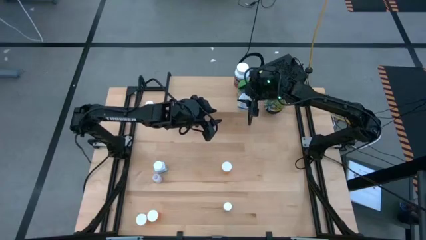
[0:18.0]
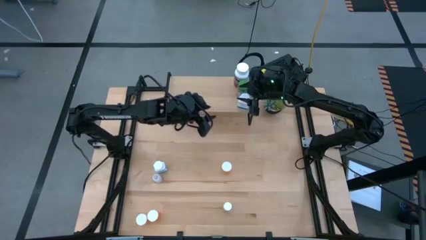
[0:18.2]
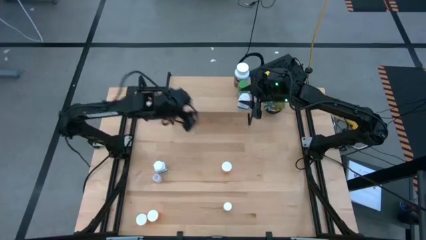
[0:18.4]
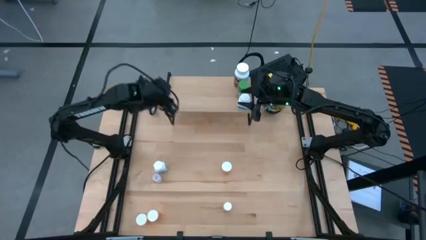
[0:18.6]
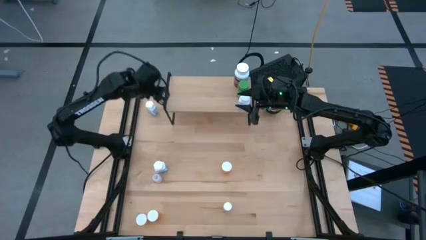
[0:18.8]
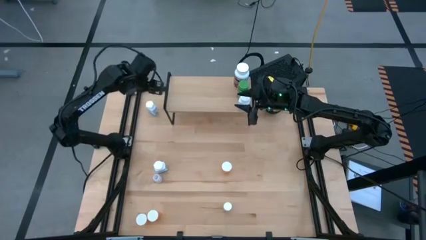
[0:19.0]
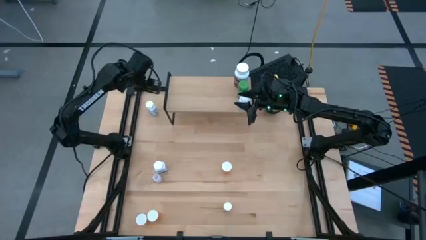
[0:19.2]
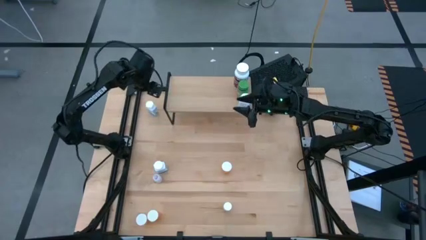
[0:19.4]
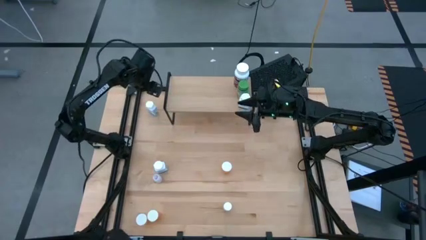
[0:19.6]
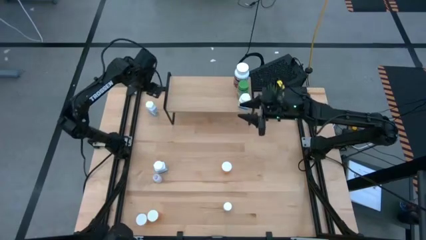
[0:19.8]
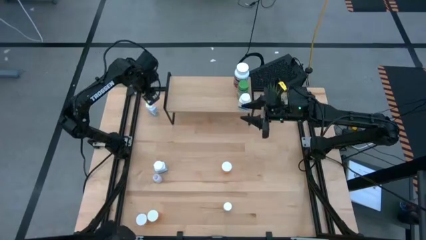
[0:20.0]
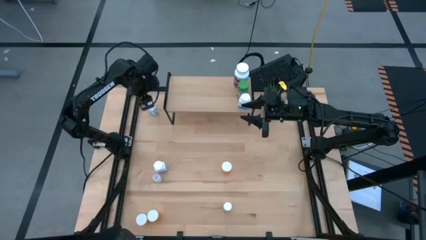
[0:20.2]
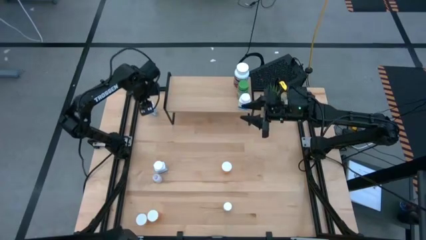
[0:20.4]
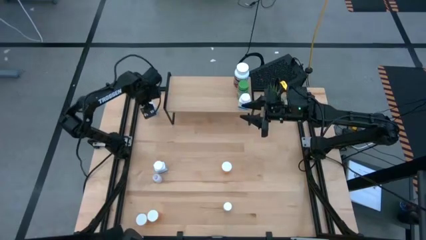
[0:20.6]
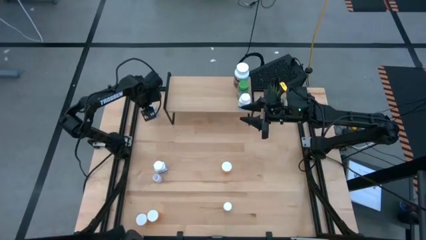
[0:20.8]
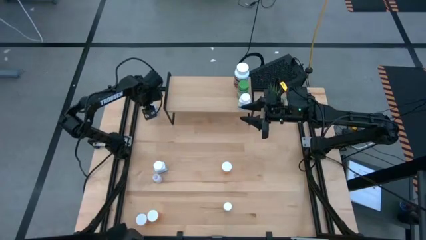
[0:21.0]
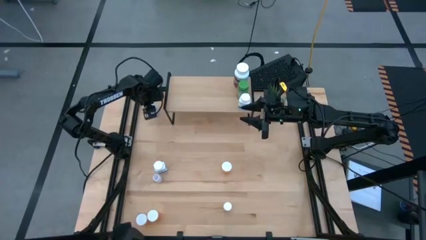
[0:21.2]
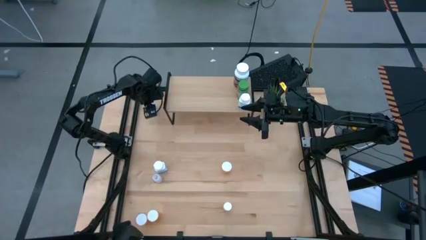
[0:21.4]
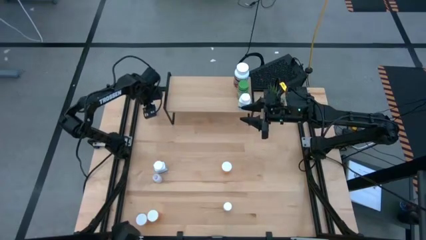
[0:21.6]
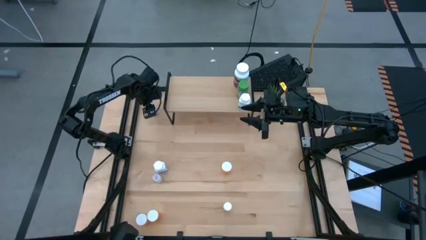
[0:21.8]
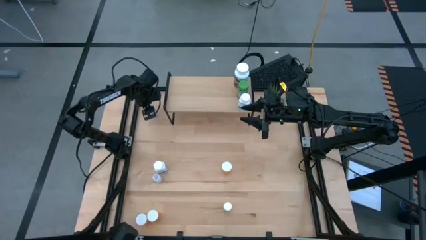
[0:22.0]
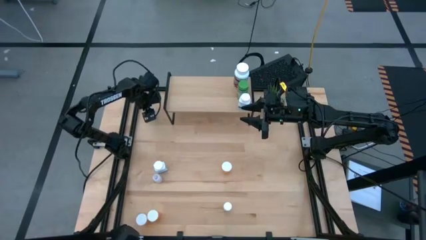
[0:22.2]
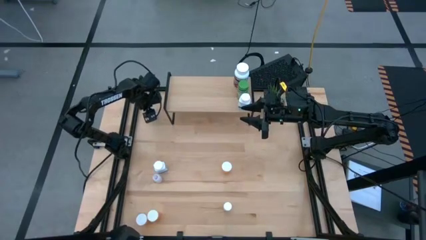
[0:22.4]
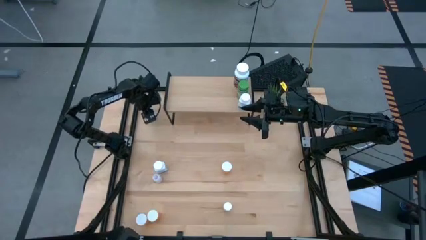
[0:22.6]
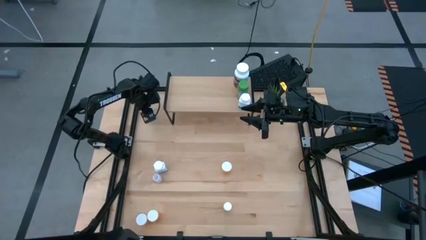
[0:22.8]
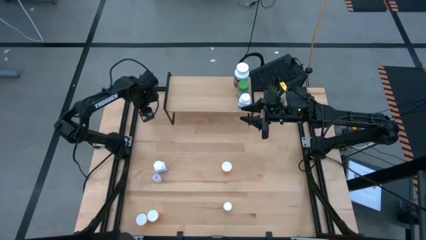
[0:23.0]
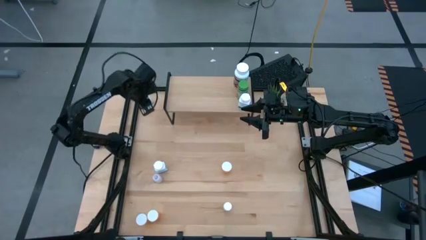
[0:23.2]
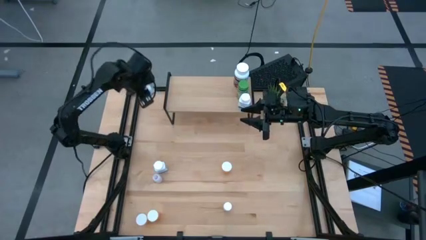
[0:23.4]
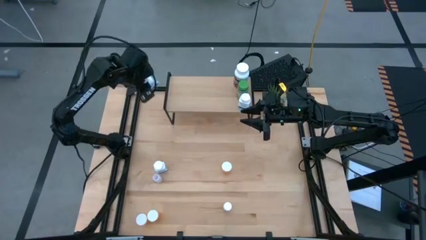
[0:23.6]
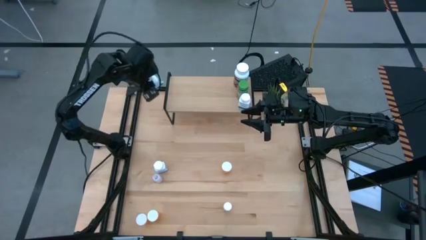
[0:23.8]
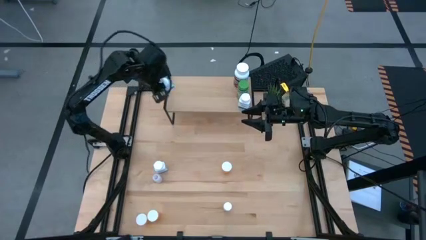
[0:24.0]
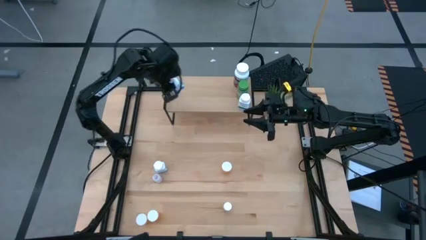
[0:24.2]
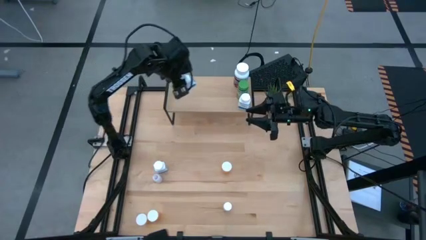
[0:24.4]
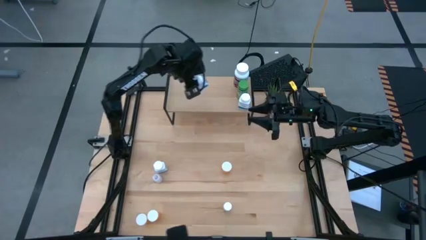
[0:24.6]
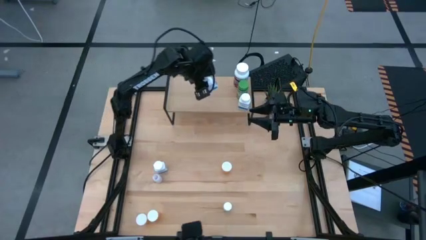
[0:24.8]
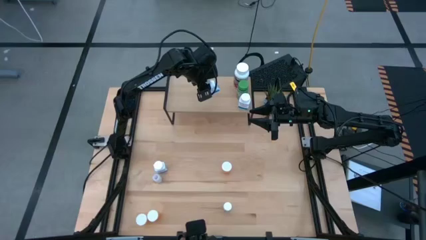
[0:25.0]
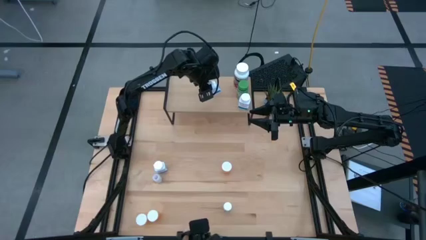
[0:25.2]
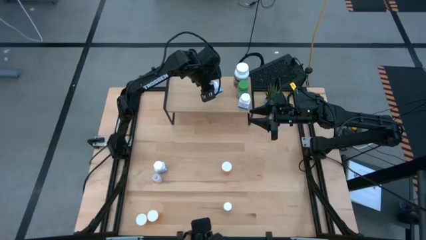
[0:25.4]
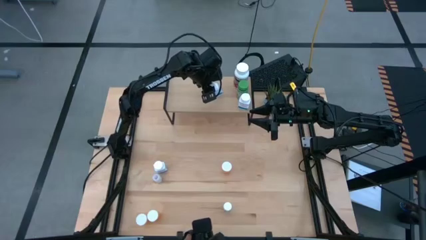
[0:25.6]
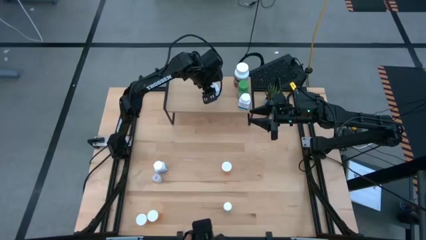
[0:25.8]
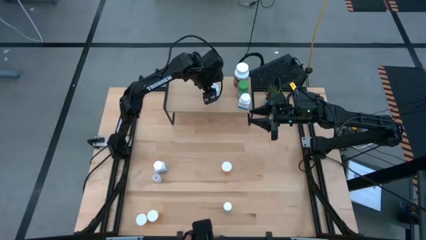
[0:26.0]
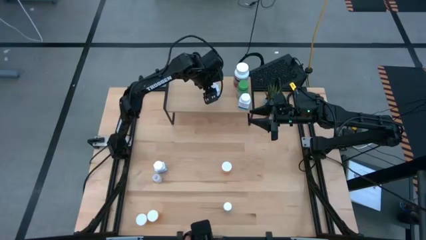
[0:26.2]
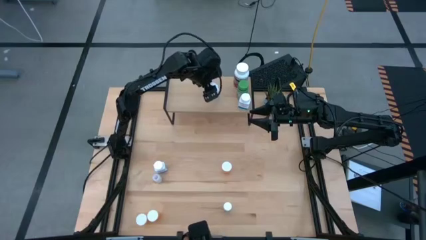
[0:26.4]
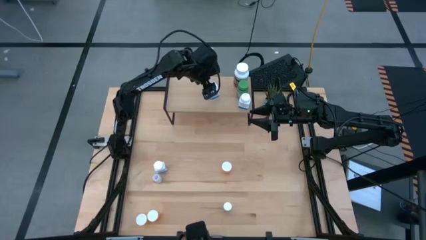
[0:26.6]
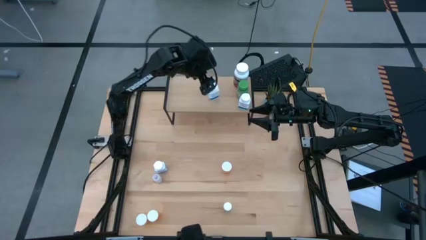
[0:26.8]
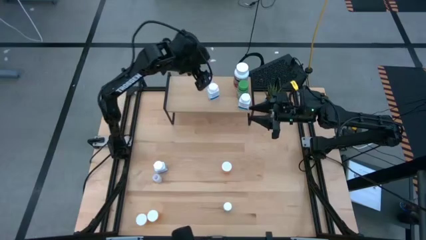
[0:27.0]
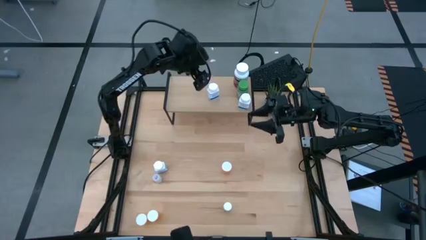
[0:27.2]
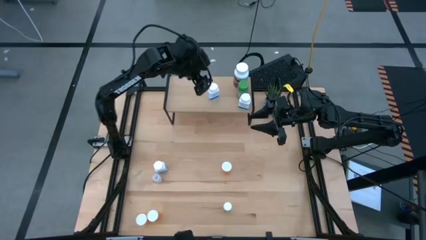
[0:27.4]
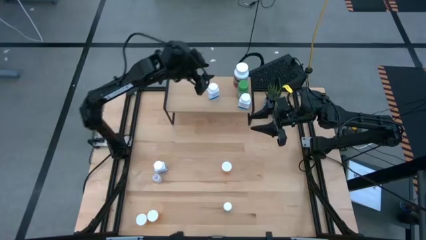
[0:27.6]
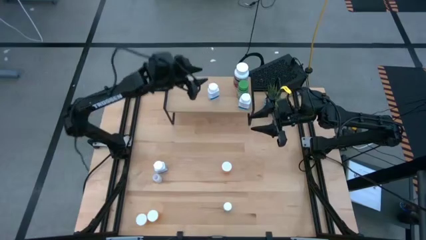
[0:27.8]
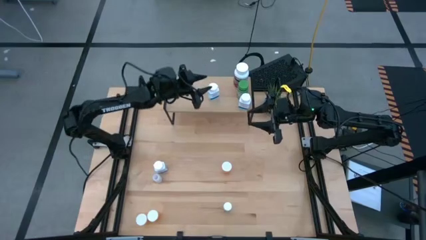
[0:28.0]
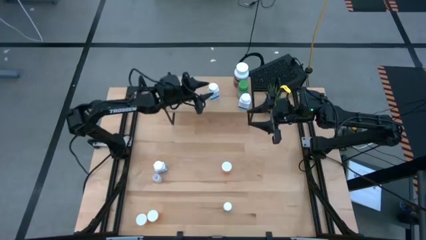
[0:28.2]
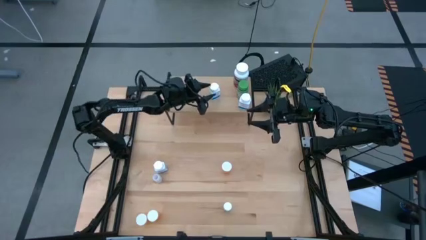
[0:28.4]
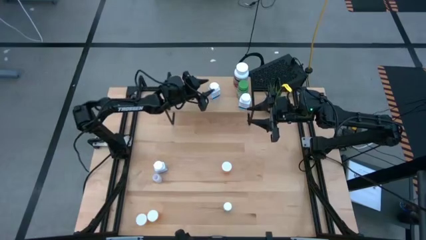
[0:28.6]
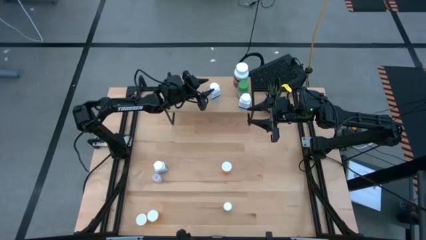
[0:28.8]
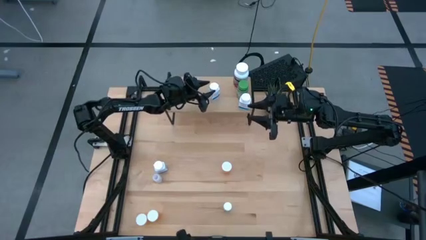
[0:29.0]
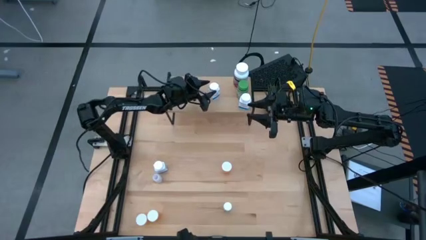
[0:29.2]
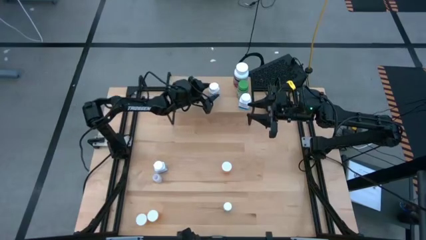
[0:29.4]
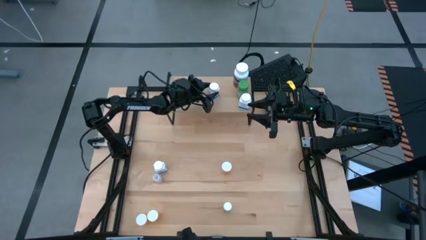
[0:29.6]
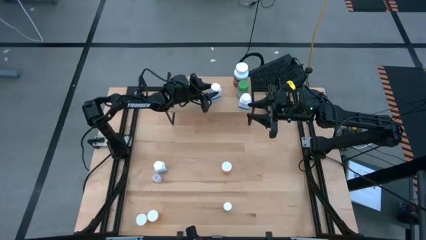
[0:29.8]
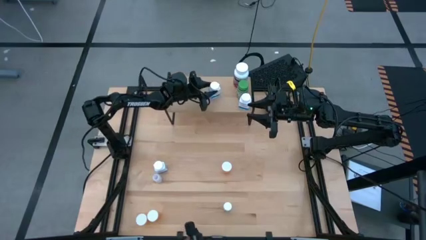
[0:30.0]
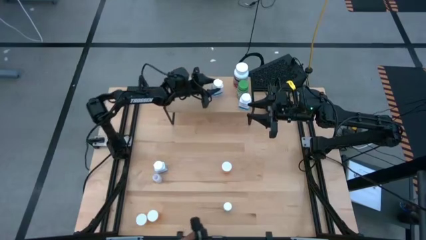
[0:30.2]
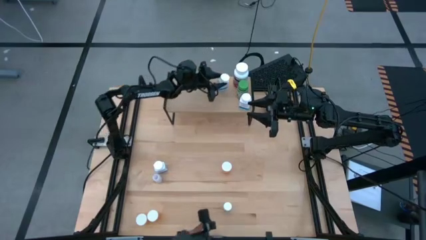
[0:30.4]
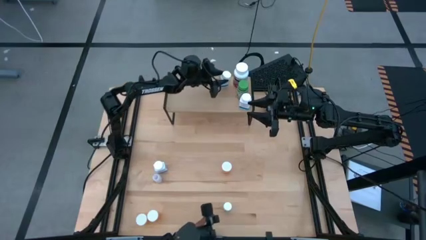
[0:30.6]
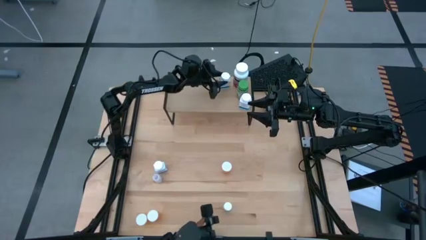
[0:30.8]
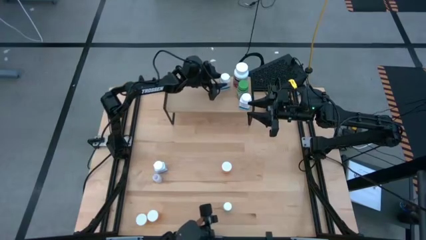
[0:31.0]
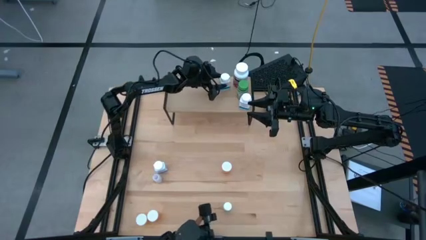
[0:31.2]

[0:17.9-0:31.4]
Task: Pick and place medicine bottles onto shelf by color
Put the top white medicine bottle on the shelf

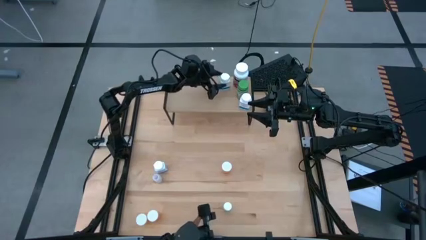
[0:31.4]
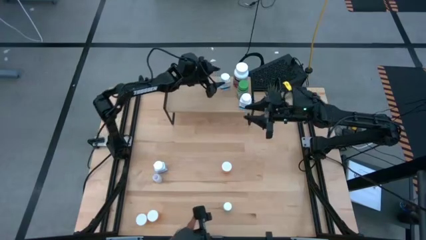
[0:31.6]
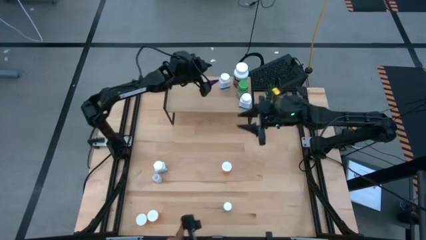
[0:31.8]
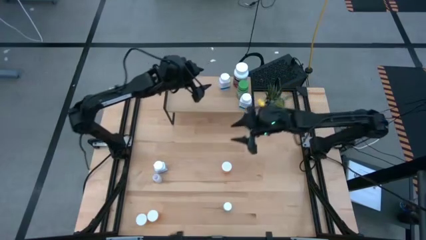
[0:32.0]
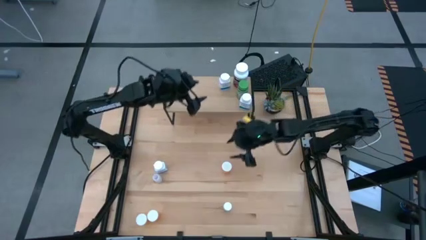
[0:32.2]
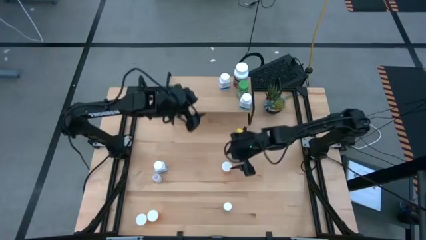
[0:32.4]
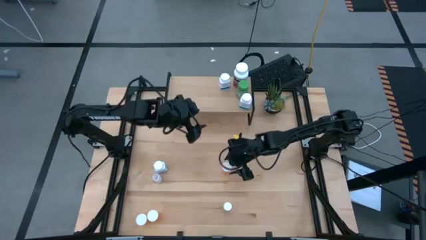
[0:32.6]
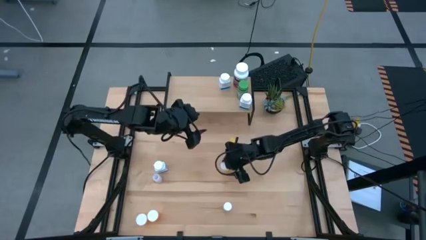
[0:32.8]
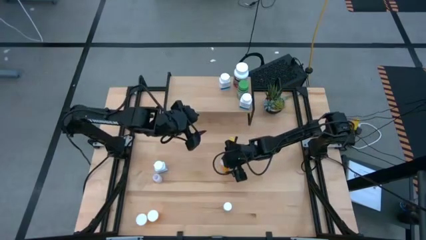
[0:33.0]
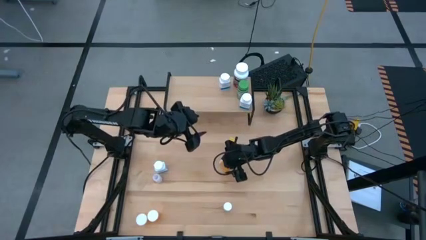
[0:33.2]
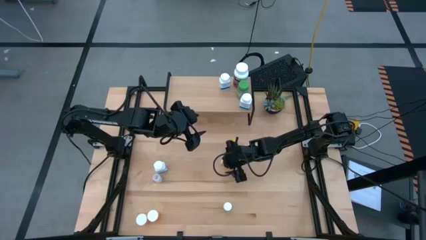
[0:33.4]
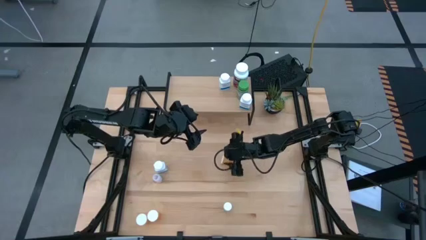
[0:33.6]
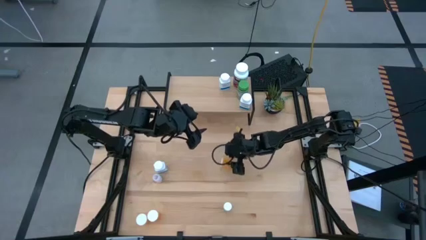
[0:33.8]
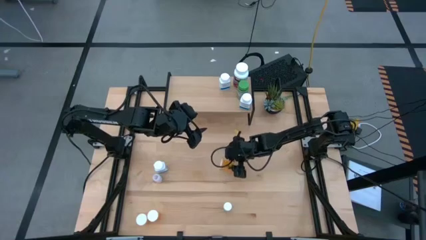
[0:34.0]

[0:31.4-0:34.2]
Put the top orange pill bottle on the shelf

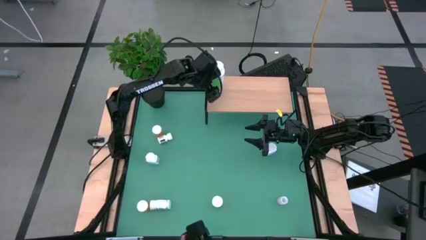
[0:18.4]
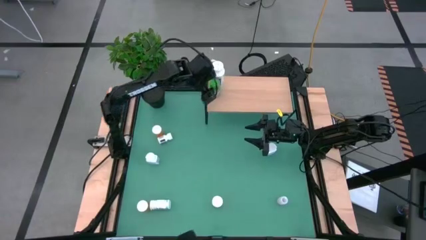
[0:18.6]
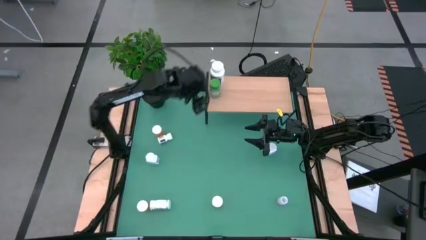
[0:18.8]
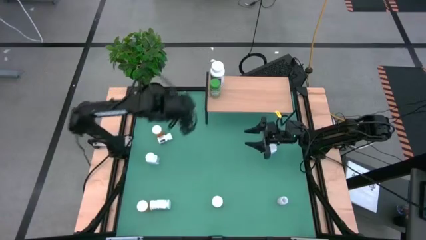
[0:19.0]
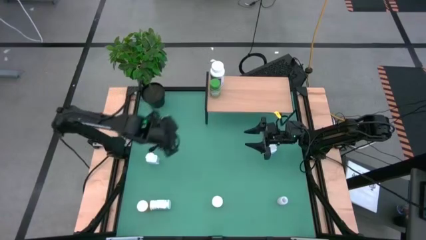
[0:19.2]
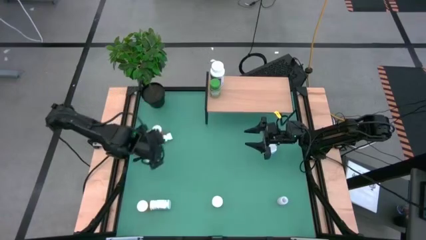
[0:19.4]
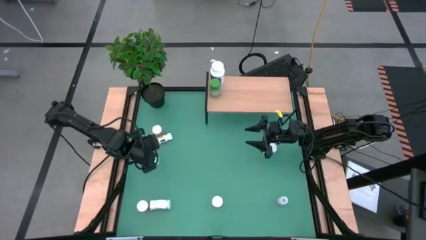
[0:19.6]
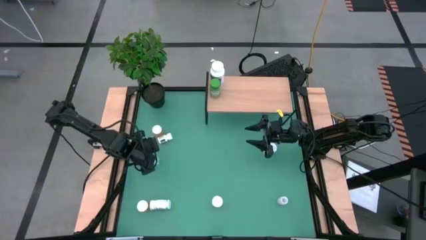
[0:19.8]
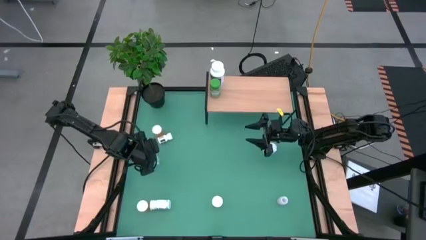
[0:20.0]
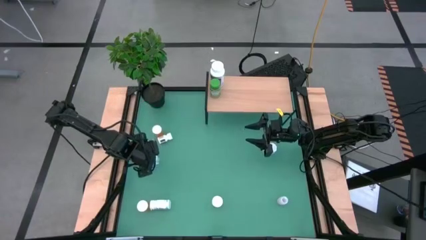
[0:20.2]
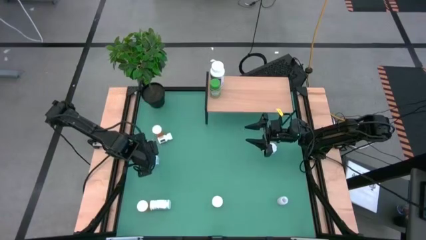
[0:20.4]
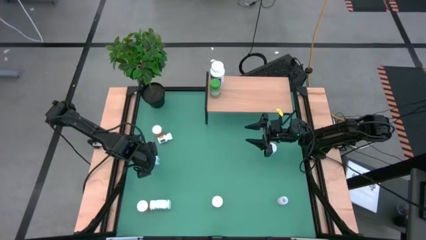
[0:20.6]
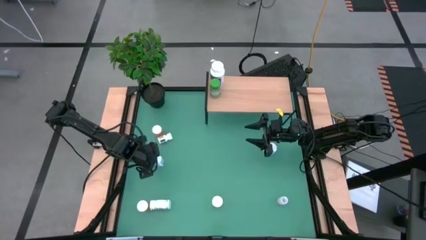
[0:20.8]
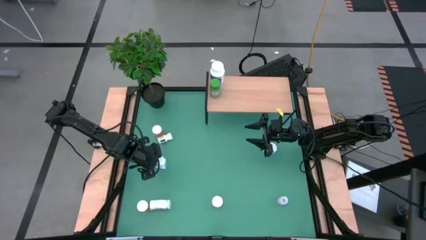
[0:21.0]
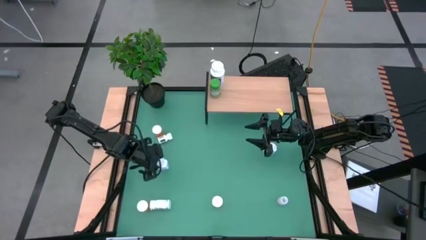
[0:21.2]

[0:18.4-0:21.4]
Task: Pick and place medicine bottles onto shelf by color
Put the middle white blue medicine bottle on the shelf
